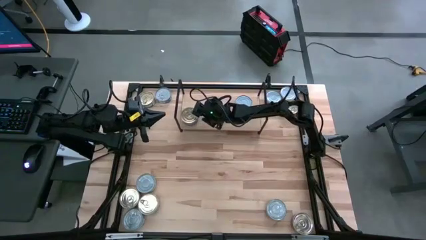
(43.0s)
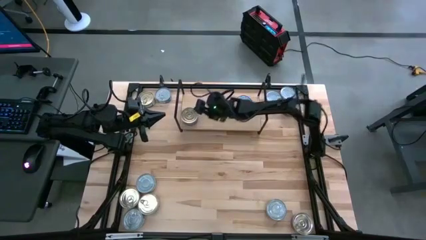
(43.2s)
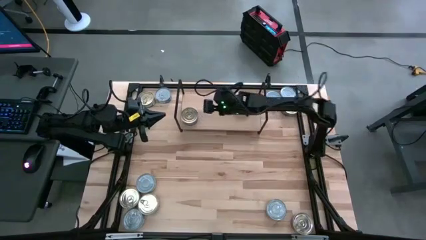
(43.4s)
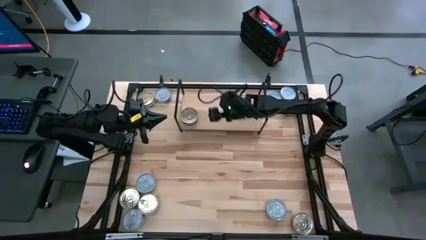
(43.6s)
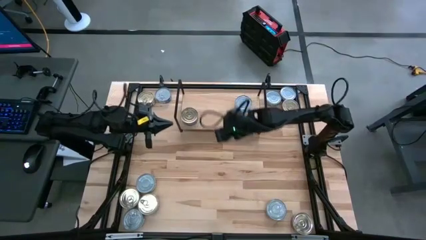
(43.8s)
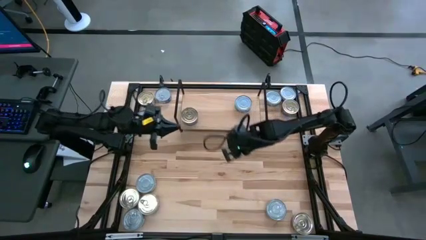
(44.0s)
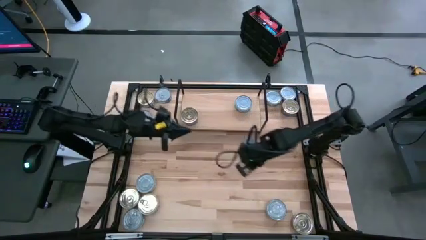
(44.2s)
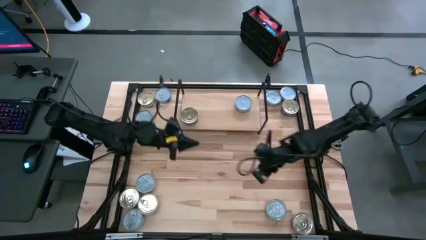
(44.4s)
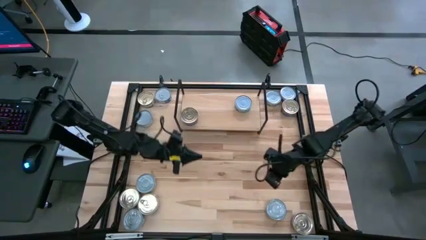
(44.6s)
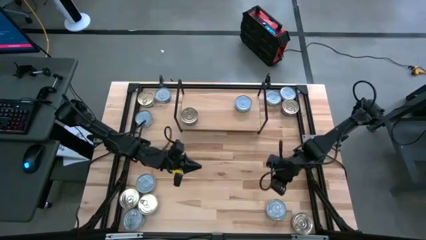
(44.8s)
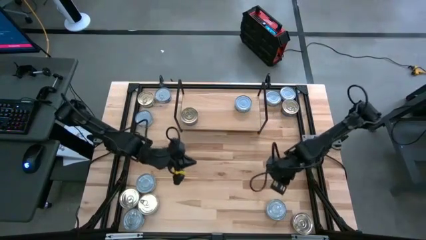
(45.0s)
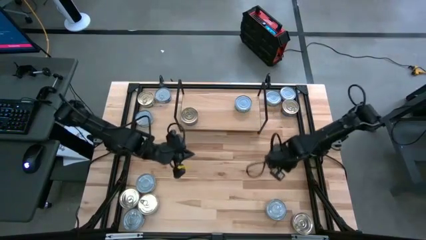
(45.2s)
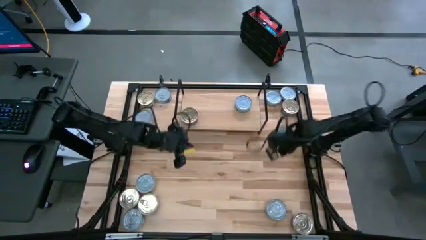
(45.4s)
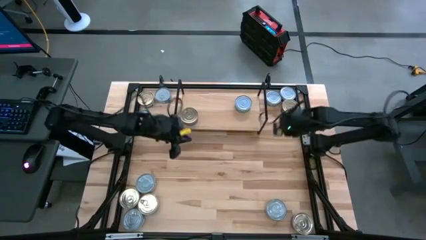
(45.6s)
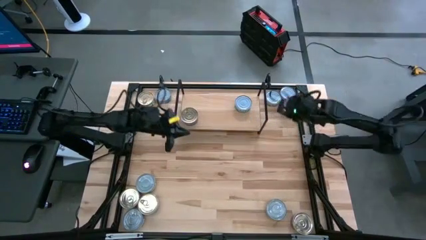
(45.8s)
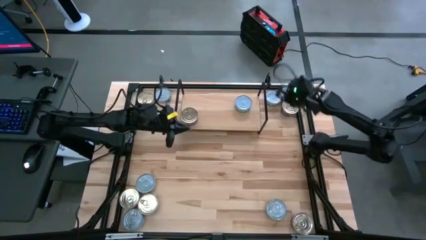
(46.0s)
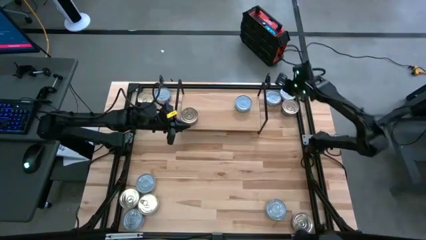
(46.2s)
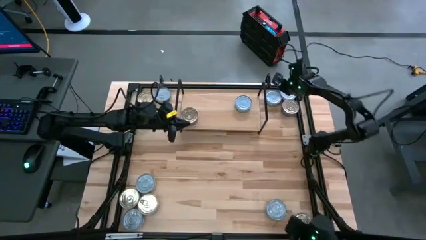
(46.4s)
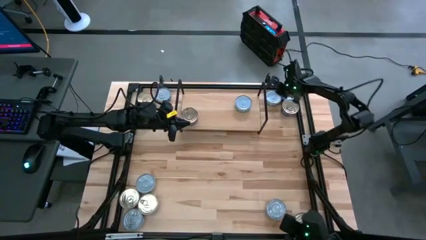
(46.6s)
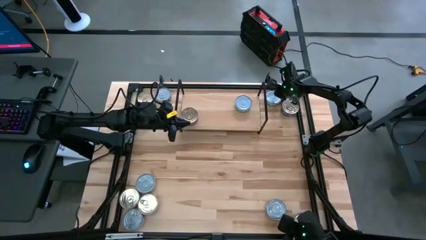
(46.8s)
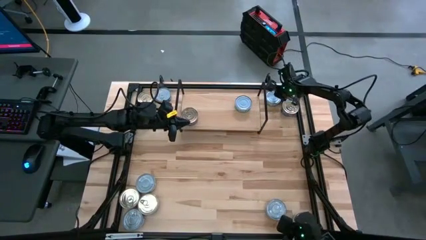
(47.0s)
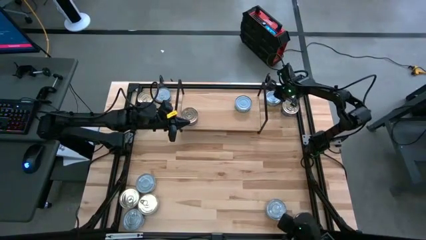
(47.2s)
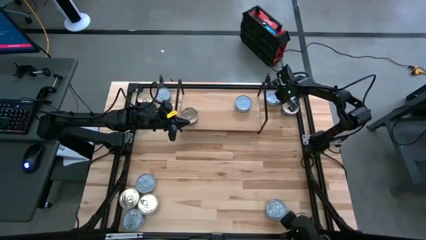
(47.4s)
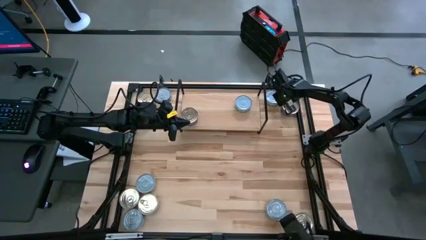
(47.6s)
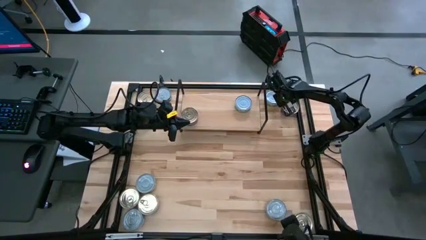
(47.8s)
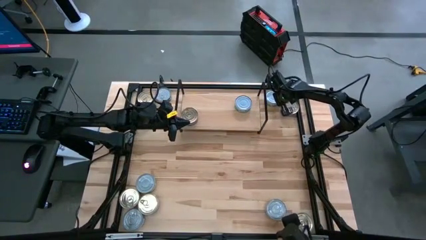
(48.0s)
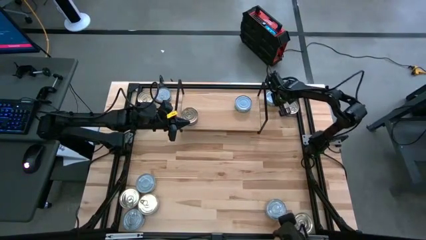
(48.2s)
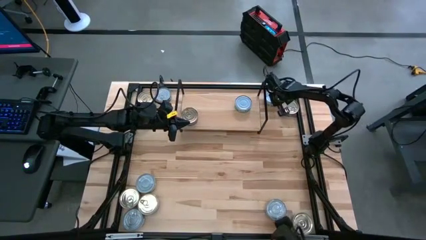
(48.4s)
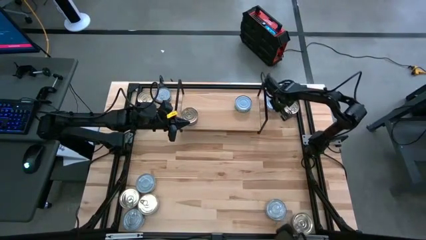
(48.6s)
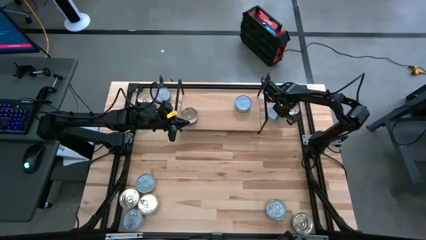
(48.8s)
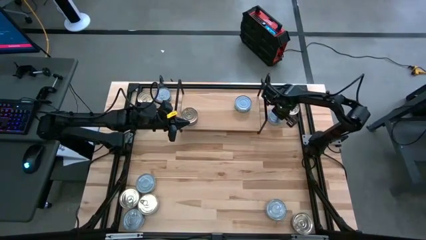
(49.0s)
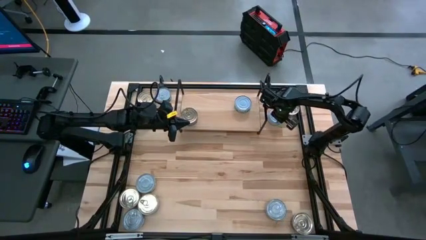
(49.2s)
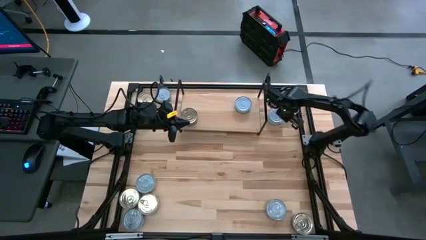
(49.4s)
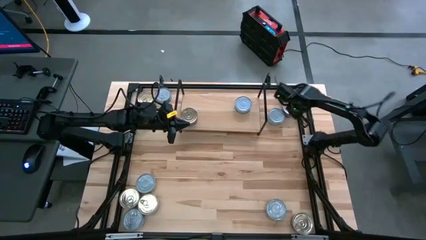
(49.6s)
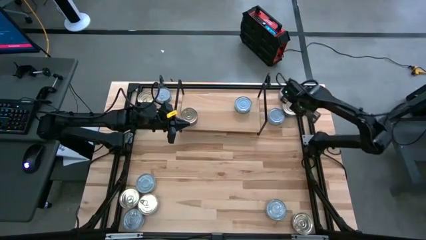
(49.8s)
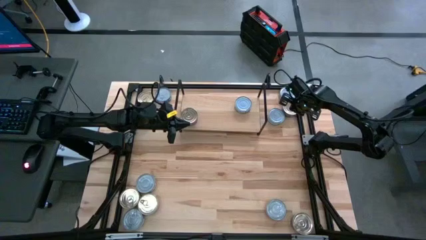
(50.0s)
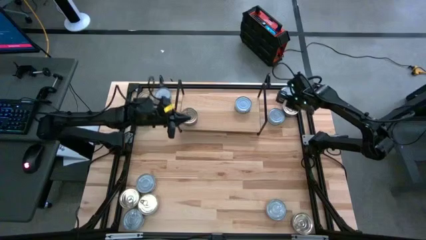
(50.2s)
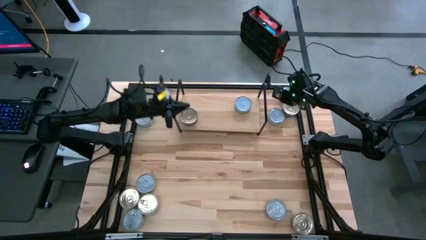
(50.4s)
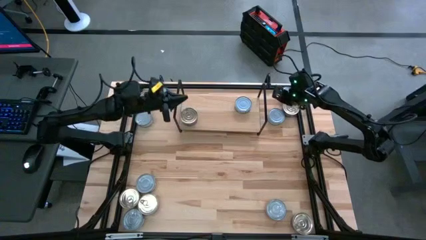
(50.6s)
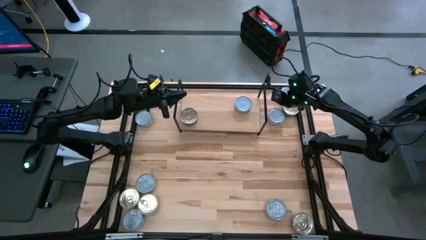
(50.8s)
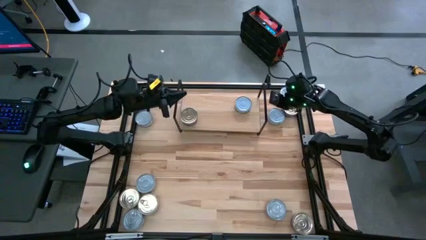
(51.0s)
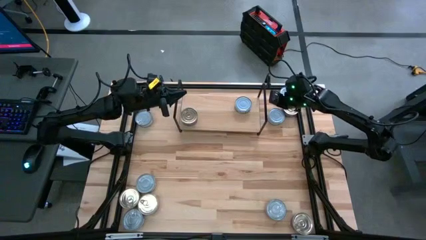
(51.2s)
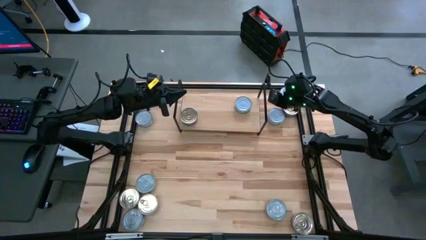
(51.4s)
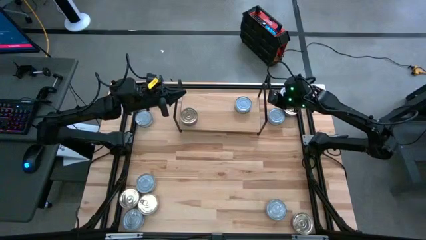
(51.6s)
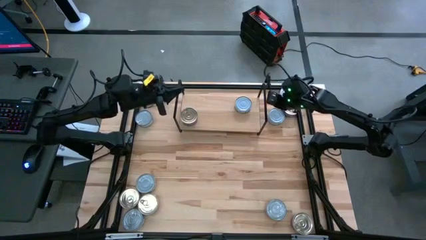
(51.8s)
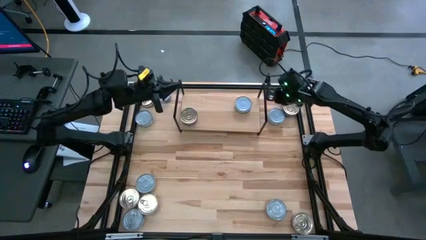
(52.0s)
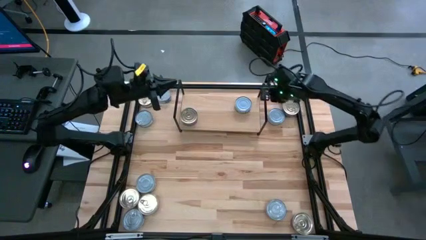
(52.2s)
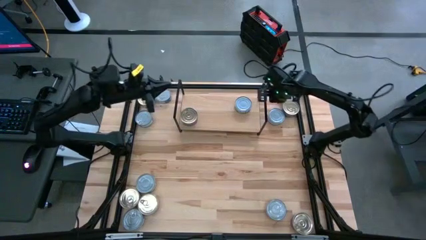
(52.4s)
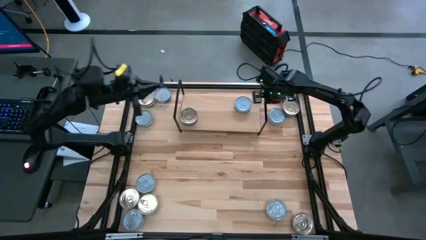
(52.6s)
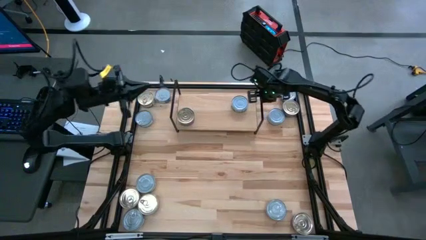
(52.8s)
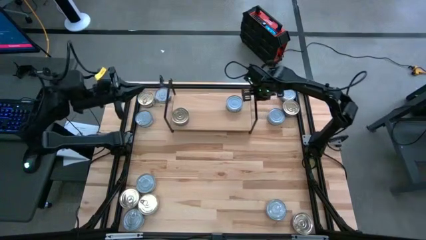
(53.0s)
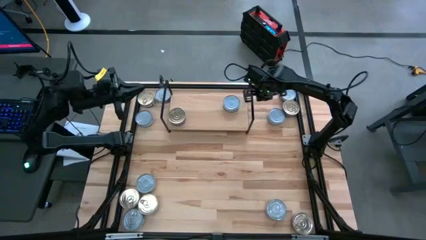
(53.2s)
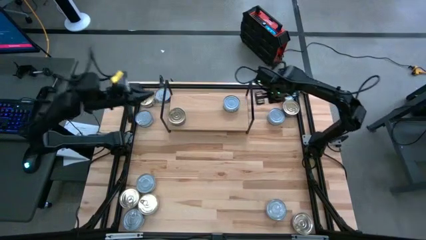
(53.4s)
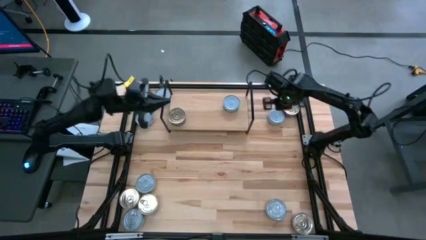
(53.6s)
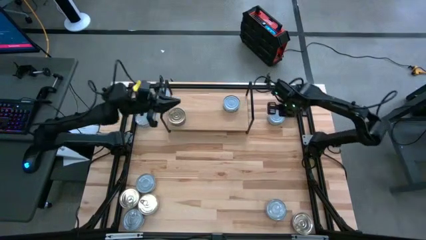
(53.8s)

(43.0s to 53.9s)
Task: Stack canned seafood by type on shelf
Stack the green tuna can on top of the other green tuna can on the shelf
